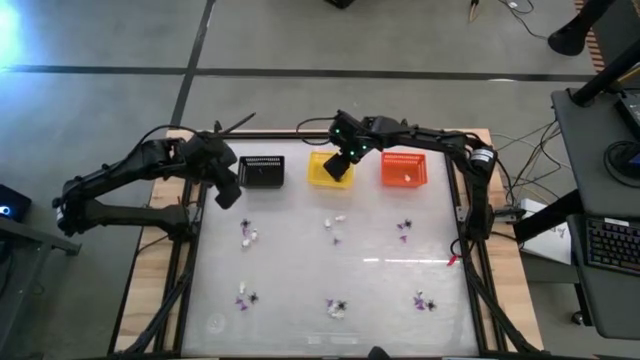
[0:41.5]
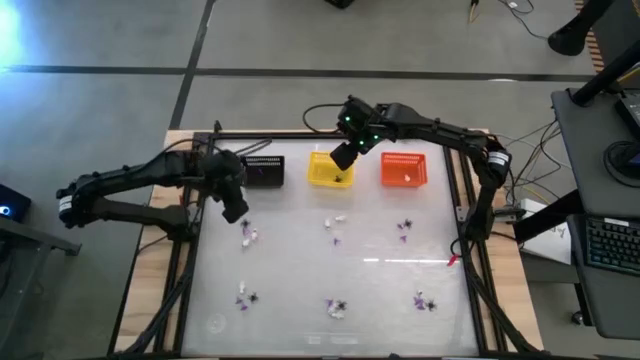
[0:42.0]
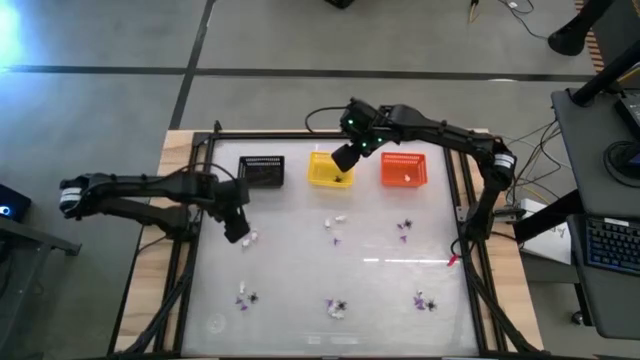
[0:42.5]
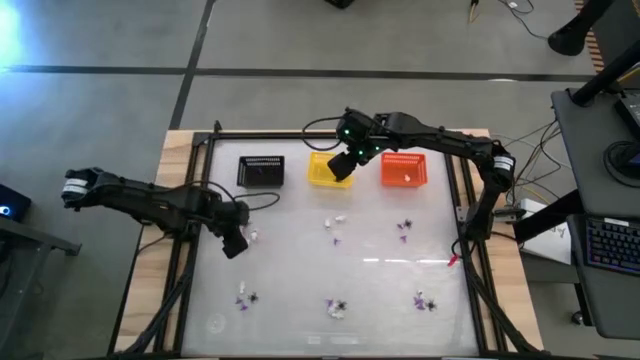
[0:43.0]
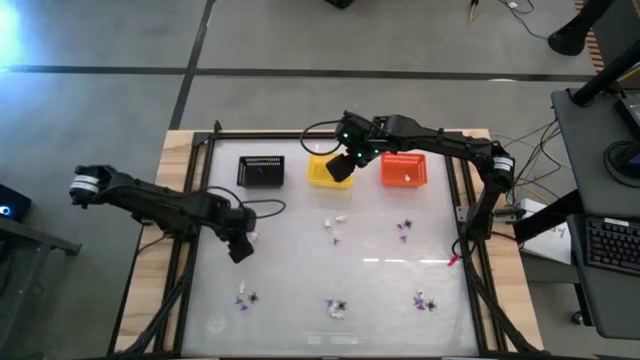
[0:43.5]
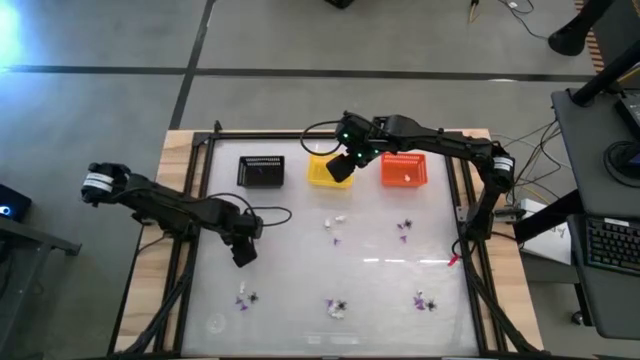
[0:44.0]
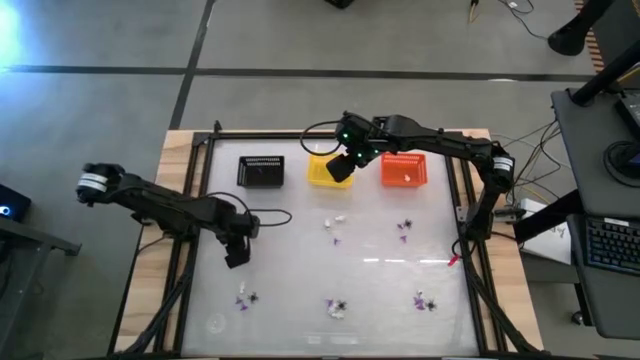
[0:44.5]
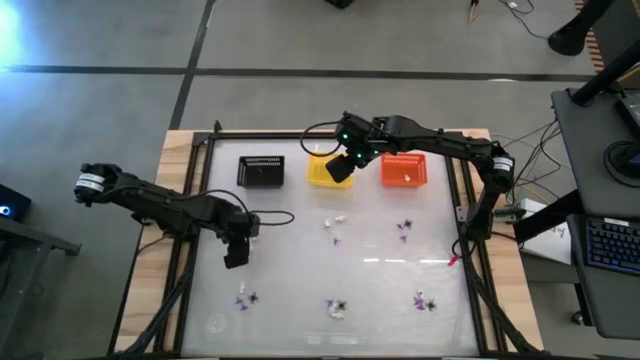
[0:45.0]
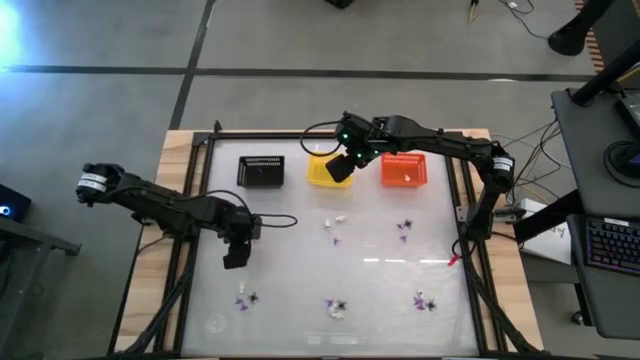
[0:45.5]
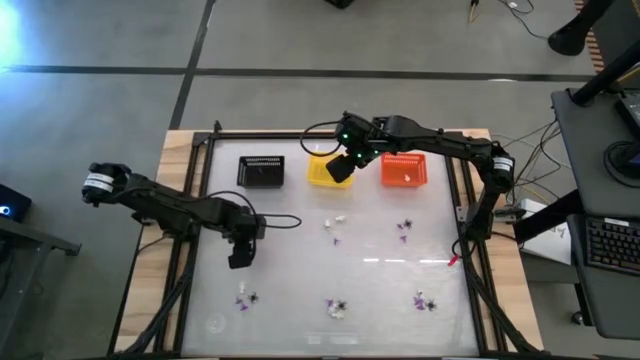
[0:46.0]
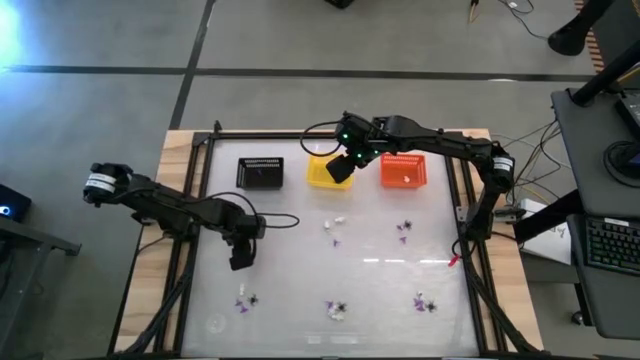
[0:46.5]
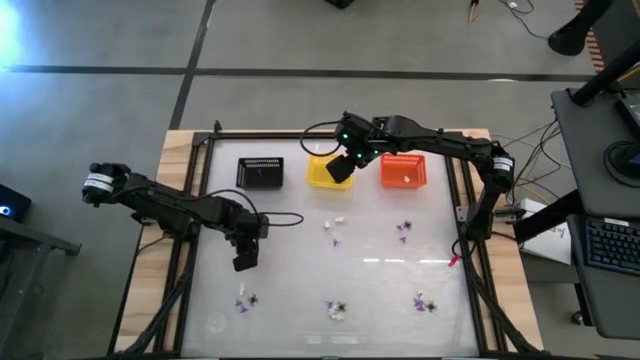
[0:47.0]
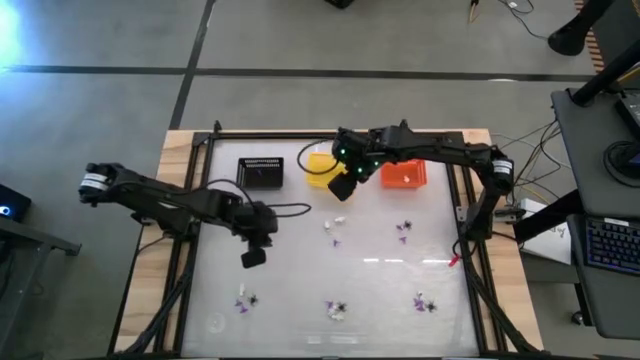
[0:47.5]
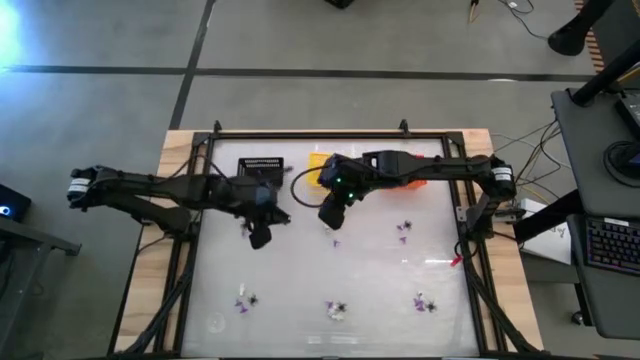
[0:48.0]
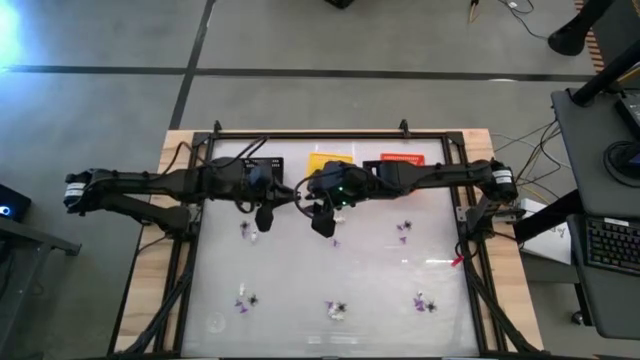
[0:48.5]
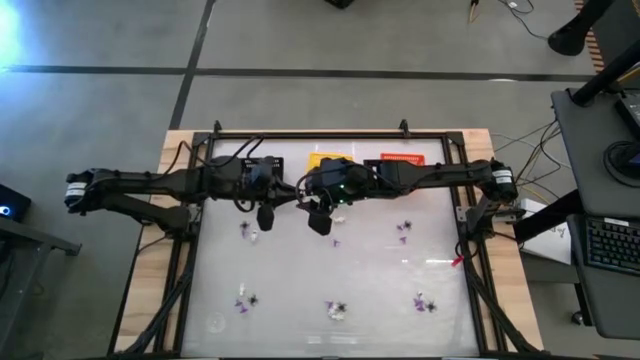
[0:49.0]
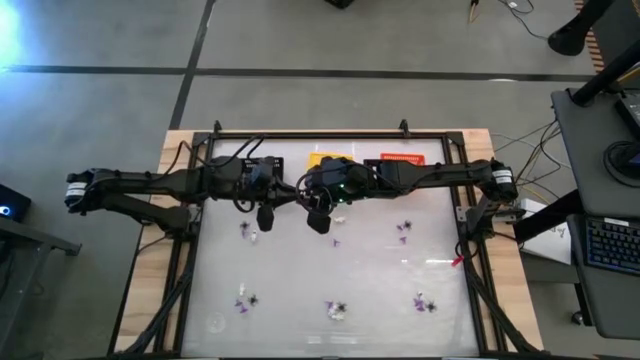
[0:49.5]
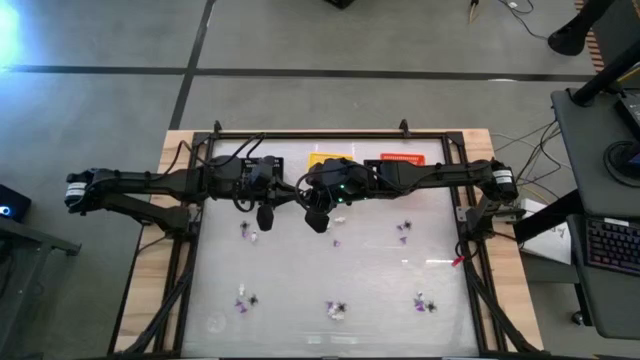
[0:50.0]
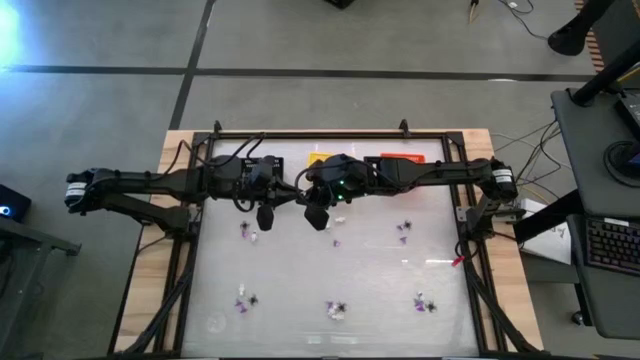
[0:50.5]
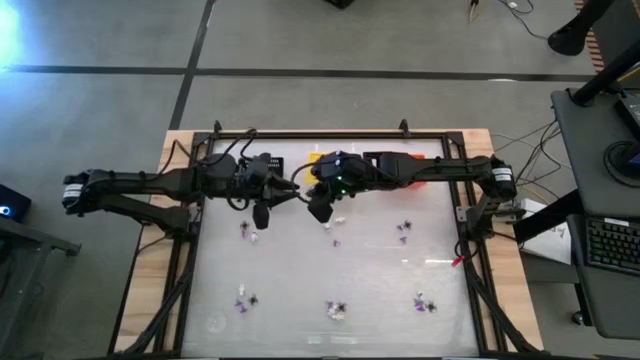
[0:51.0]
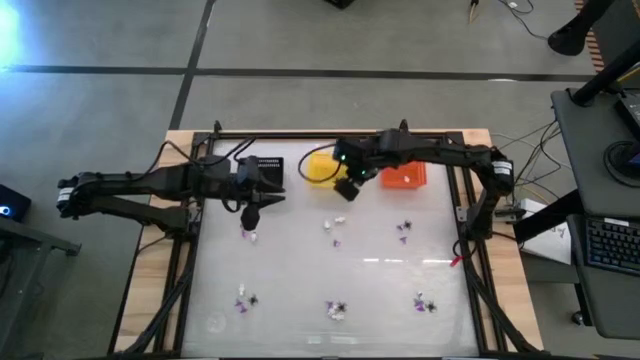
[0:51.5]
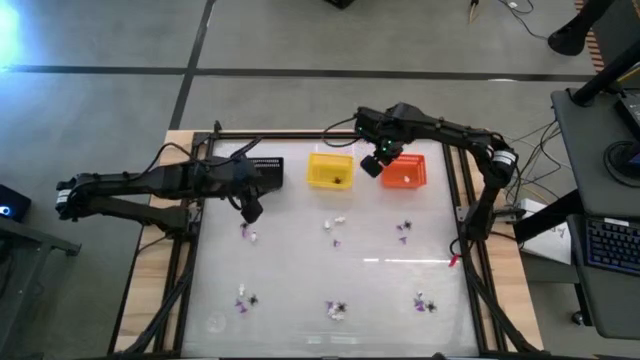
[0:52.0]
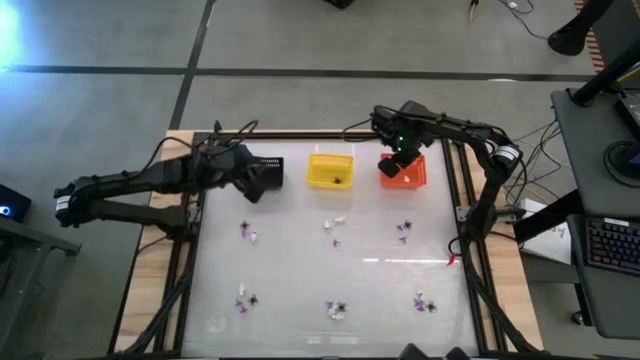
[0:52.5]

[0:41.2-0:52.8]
Task: Sort Halloween decoration
Put the white skeleton toy into the orange bin

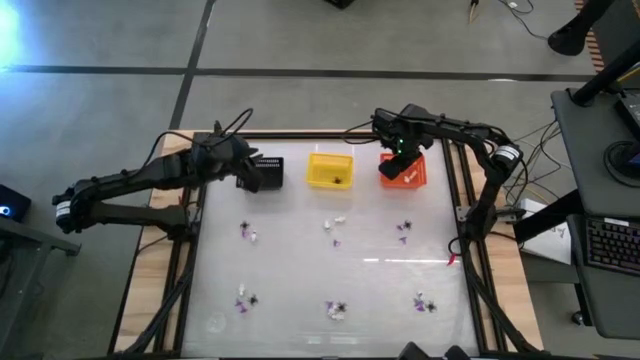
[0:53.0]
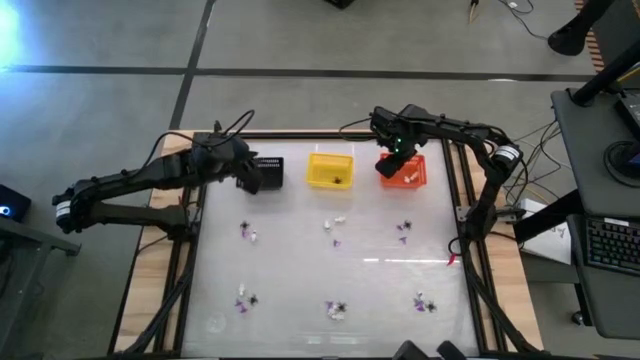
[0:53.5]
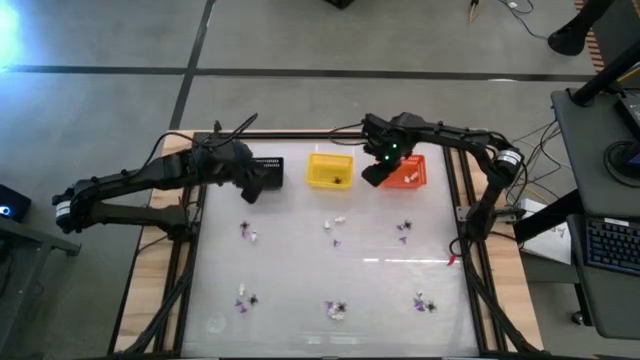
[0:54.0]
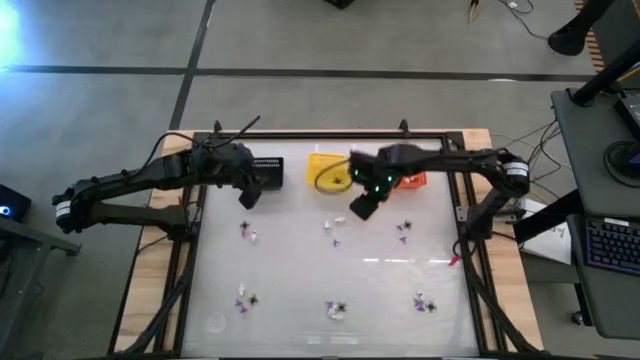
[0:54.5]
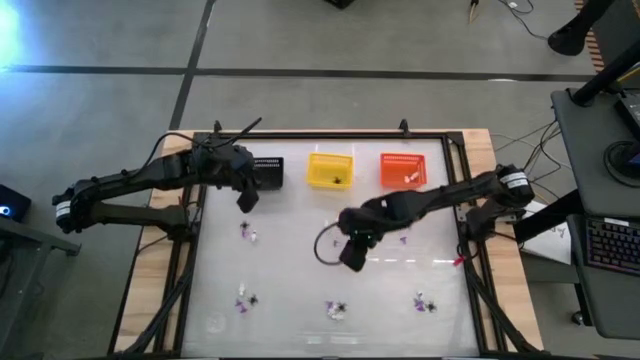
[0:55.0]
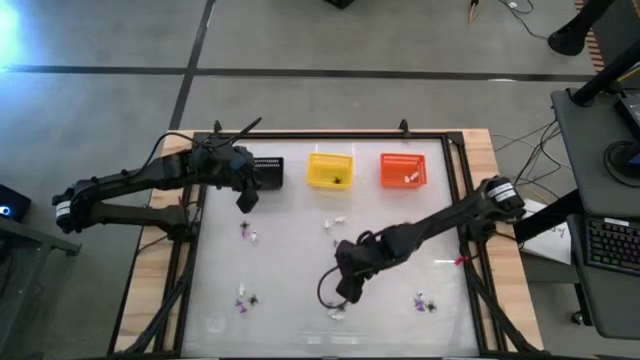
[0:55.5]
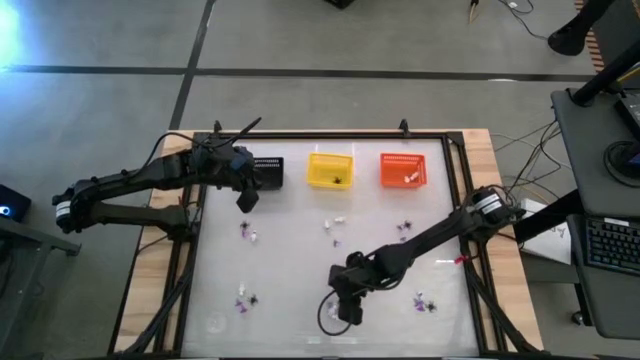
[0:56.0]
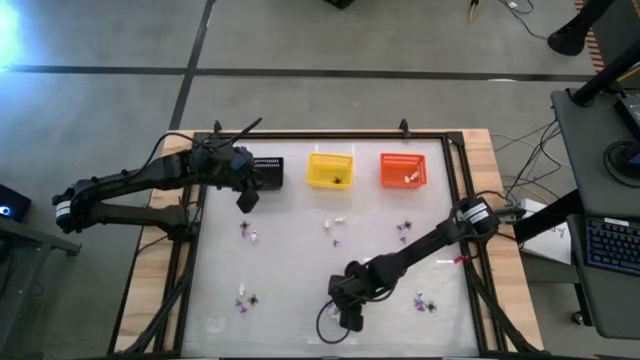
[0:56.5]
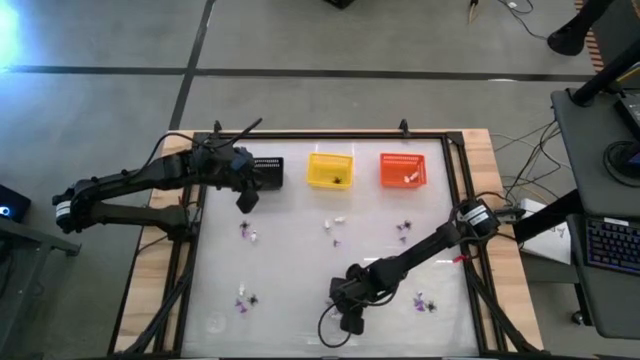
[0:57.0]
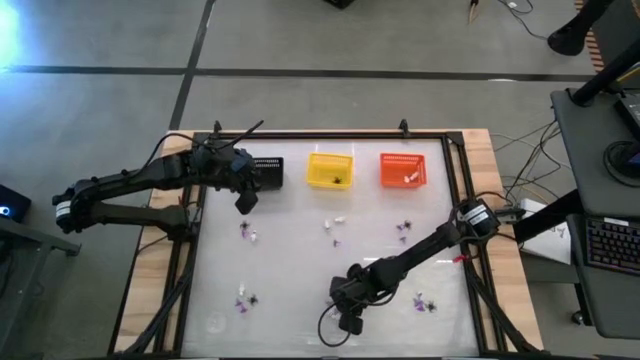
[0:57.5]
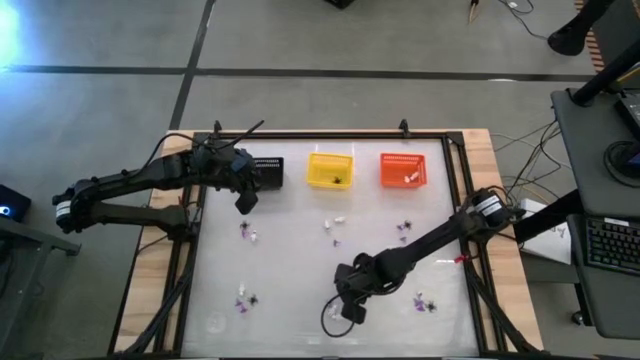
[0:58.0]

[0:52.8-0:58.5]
Put the black spider toy into the yellow bin

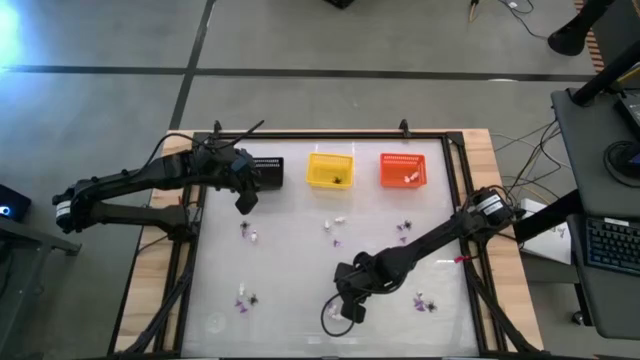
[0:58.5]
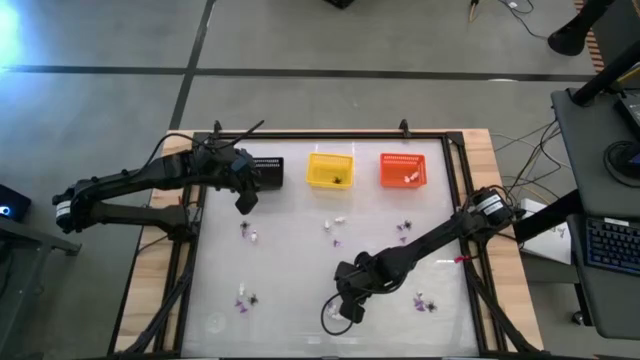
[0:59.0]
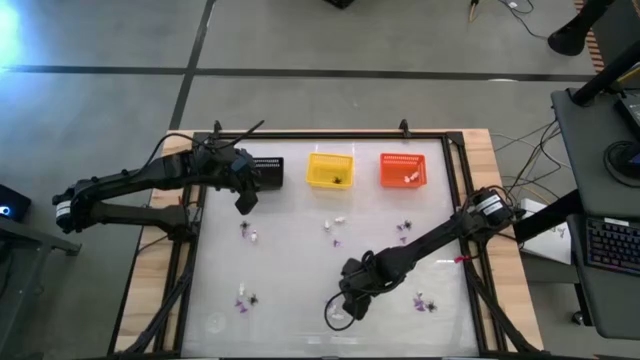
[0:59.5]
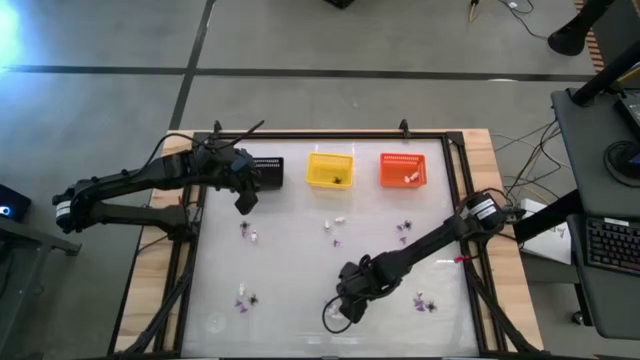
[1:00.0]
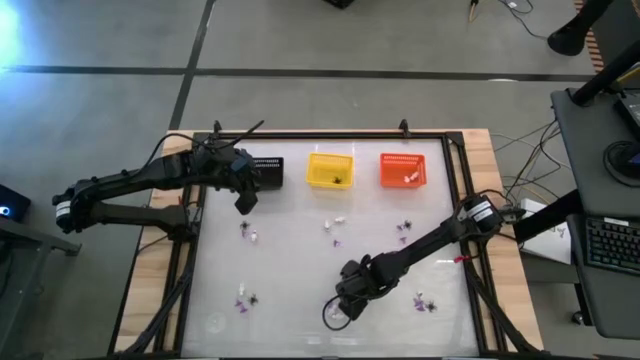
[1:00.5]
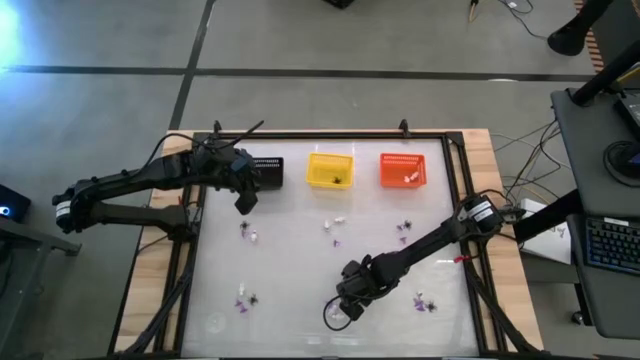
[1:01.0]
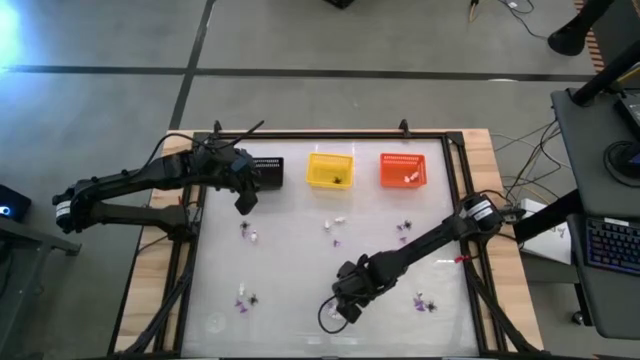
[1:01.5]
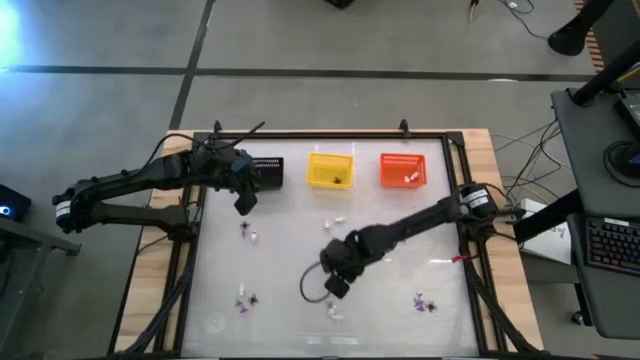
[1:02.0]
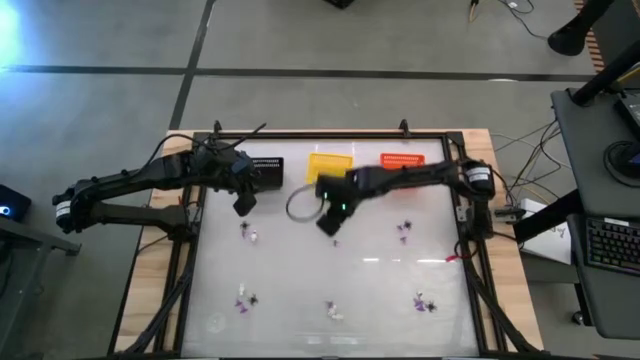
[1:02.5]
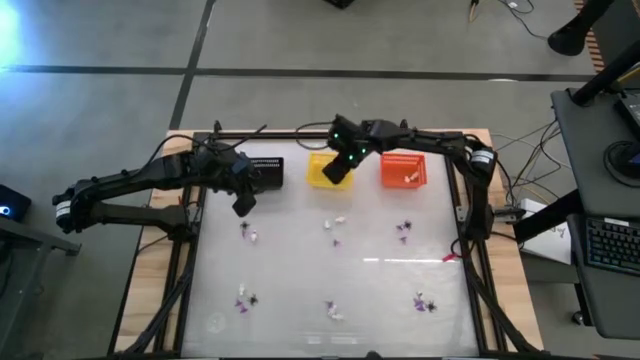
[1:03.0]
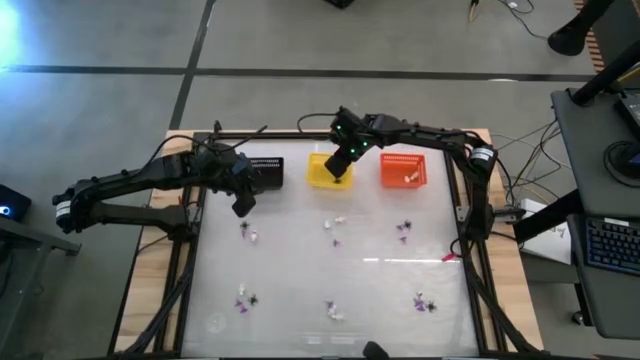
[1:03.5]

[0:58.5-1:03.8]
Put the black spider toy into the yellow bin
